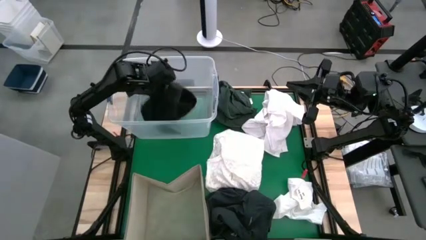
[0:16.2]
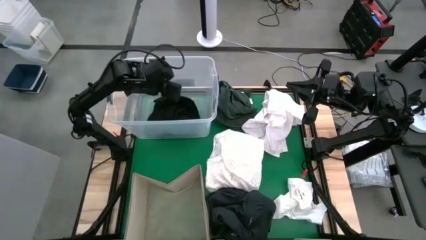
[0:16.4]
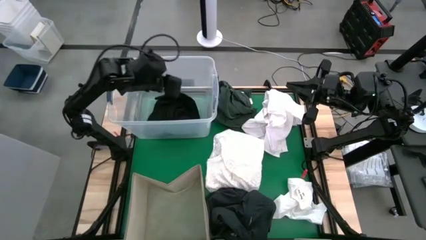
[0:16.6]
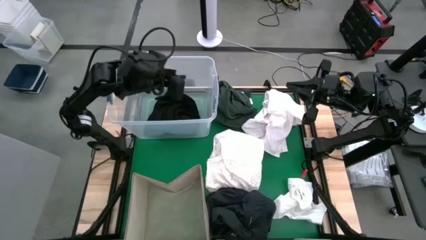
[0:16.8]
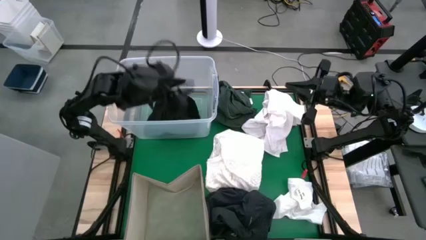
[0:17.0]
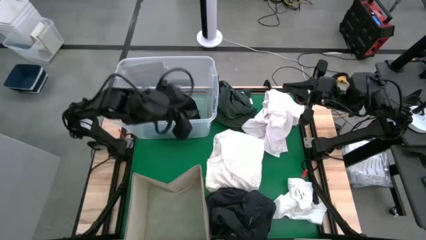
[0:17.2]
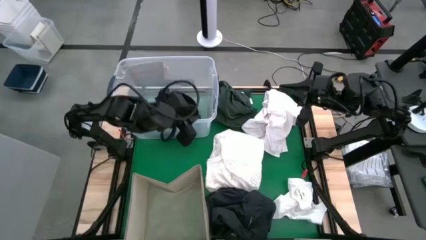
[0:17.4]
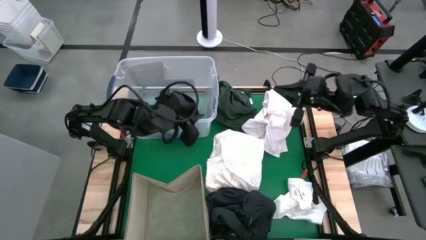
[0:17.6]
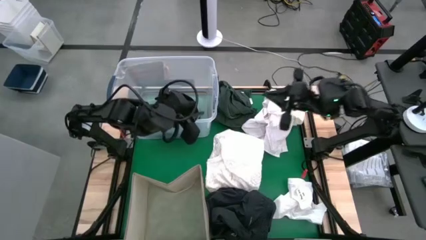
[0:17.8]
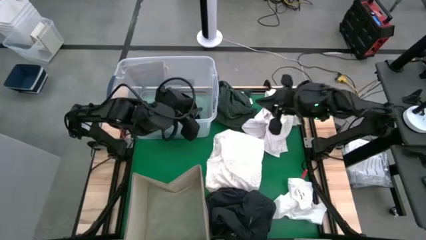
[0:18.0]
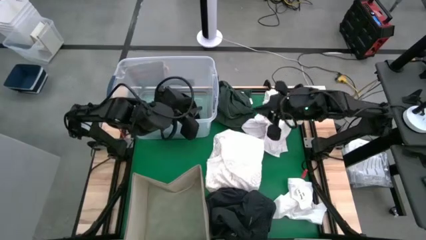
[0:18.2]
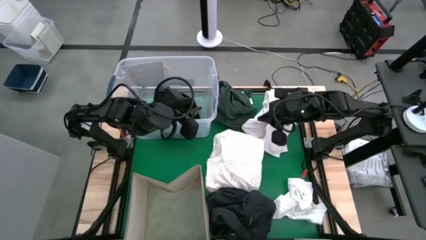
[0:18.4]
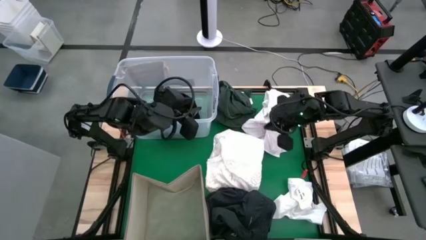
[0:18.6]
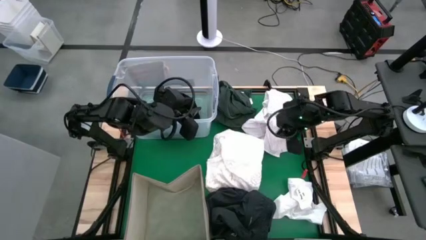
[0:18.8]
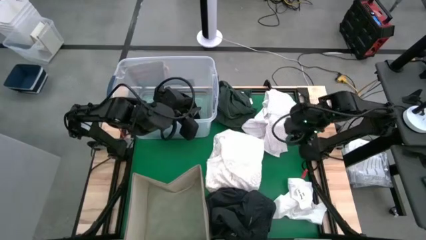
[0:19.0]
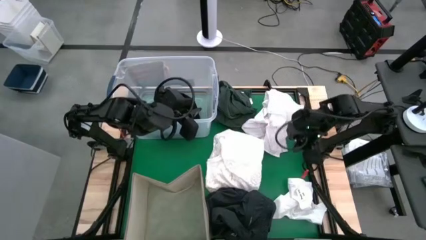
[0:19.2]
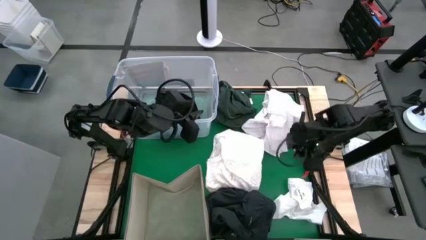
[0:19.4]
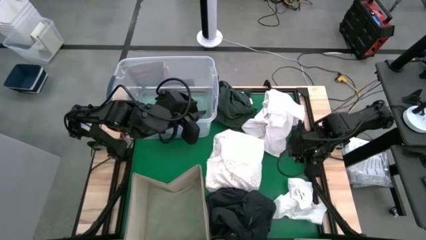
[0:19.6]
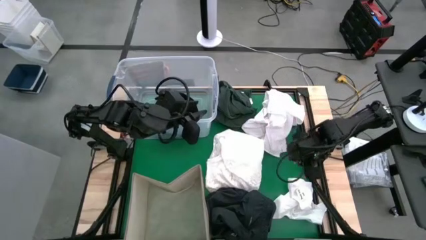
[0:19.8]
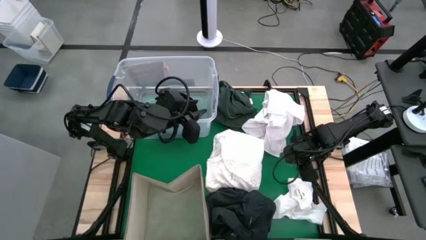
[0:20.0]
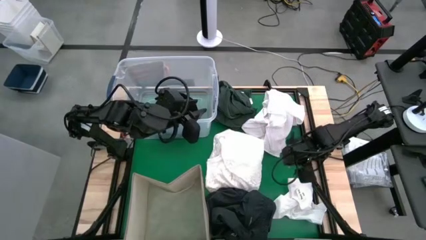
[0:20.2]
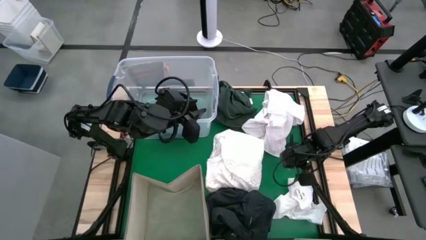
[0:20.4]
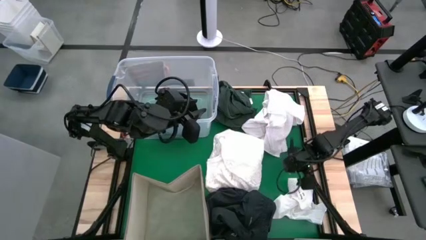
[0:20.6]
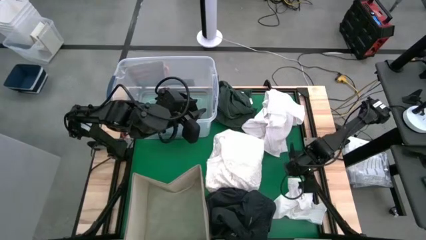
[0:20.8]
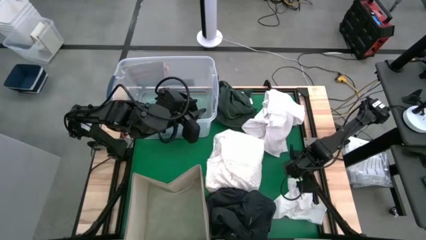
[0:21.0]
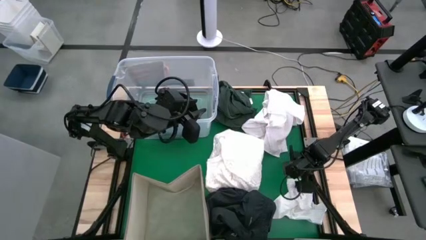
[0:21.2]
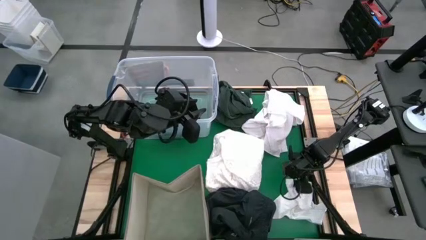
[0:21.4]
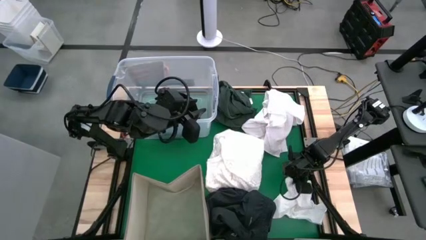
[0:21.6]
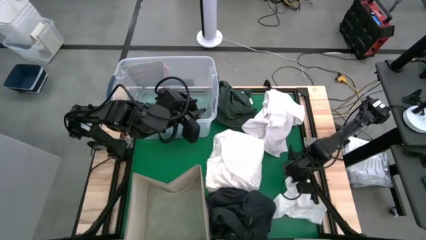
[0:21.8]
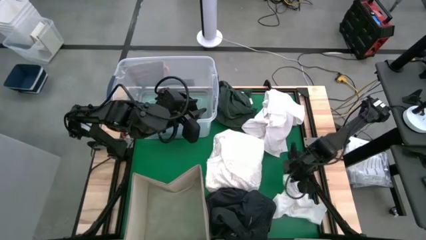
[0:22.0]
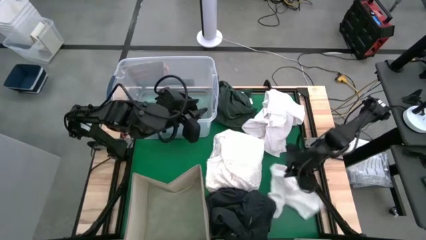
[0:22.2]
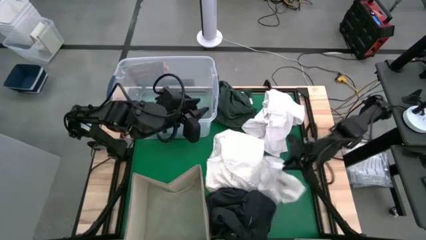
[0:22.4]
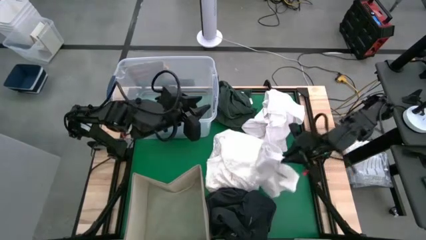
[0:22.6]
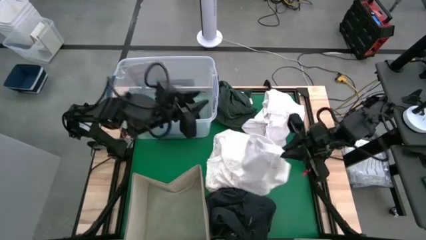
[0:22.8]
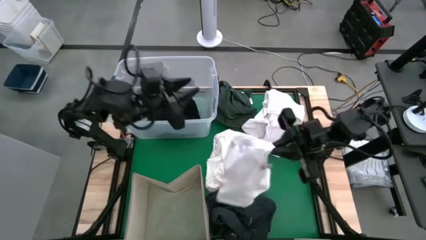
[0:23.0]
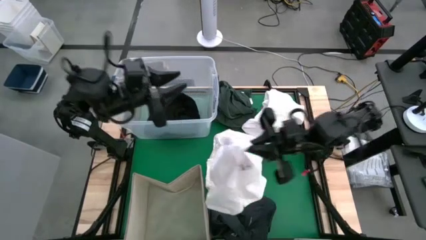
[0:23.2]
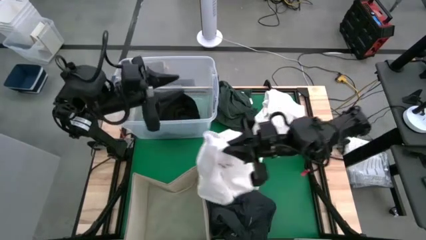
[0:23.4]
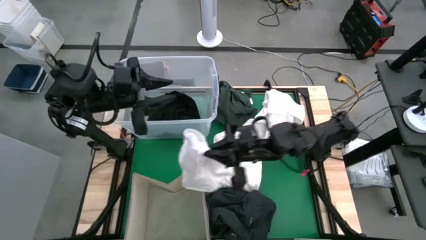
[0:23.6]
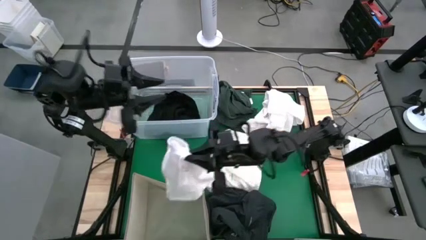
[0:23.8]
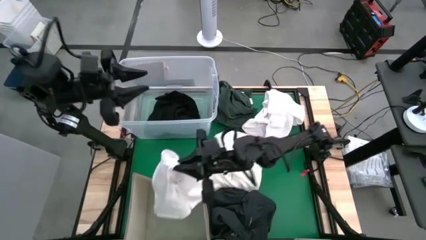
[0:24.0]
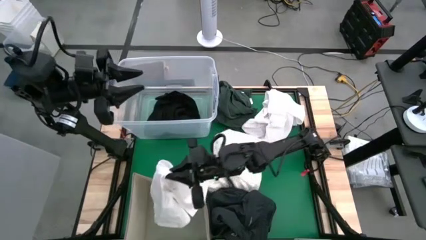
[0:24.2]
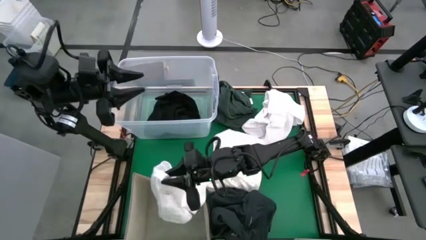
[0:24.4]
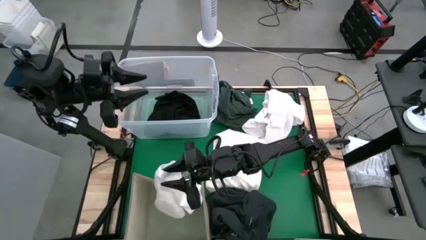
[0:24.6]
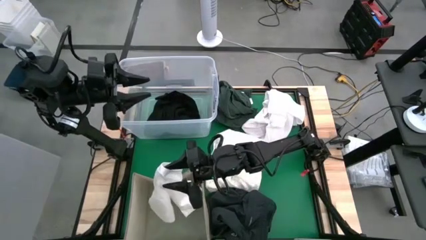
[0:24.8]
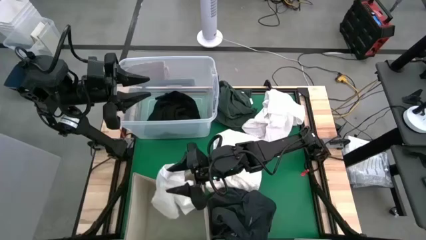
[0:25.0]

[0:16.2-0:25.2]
Task: Sort clothes
Put the bottom white shirt into the brown bin

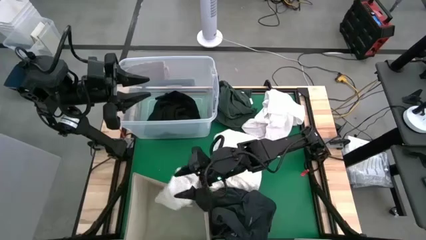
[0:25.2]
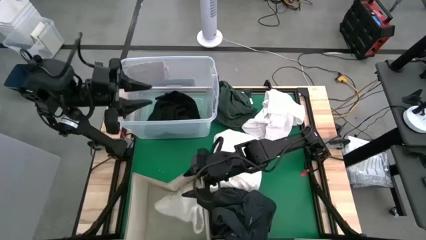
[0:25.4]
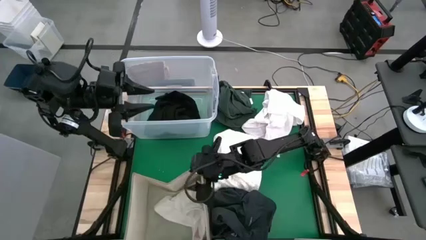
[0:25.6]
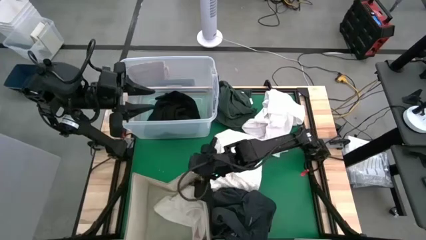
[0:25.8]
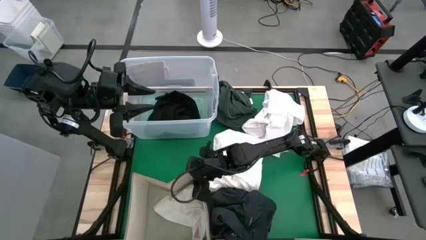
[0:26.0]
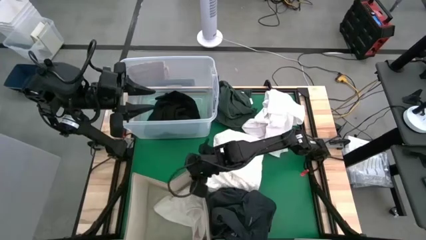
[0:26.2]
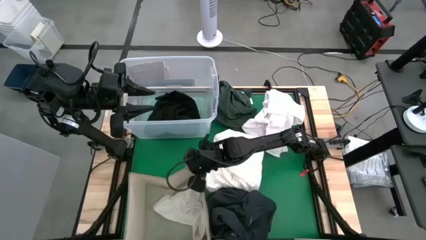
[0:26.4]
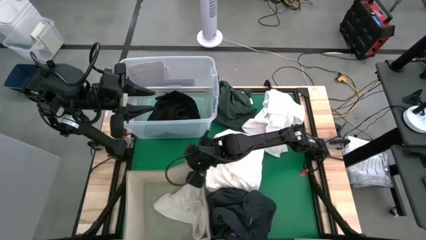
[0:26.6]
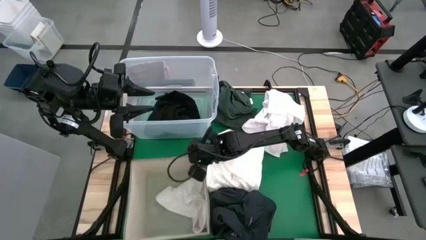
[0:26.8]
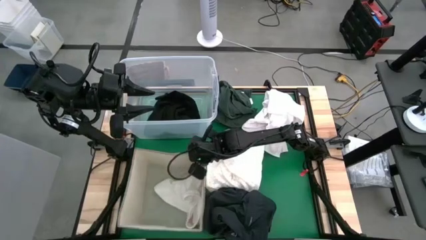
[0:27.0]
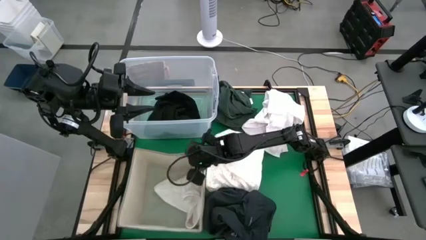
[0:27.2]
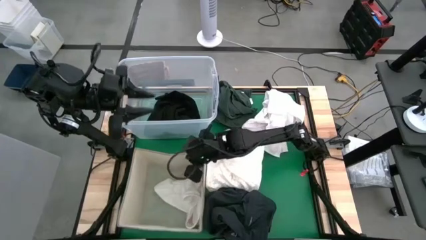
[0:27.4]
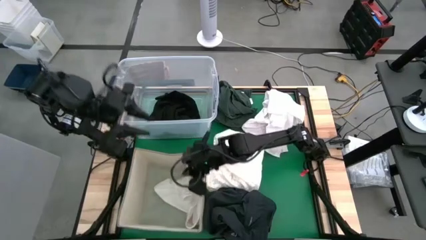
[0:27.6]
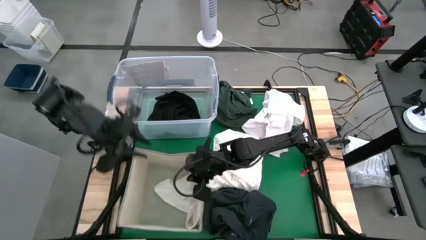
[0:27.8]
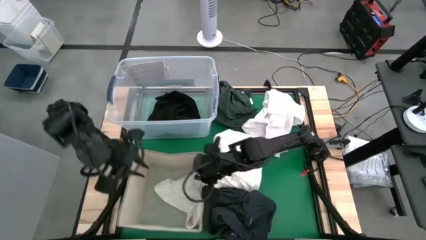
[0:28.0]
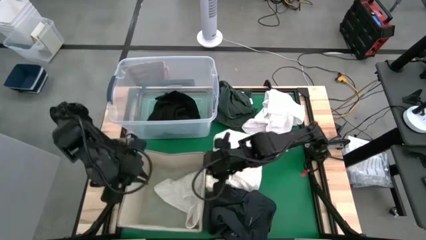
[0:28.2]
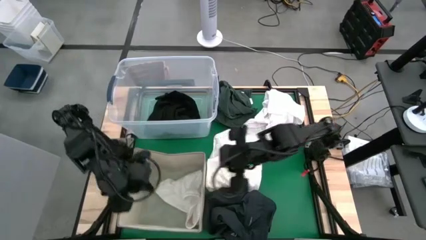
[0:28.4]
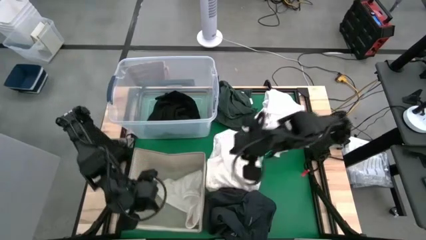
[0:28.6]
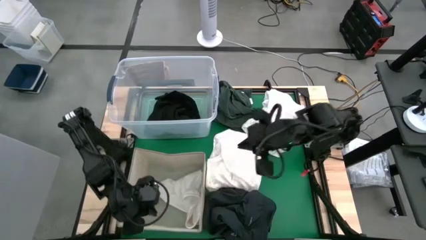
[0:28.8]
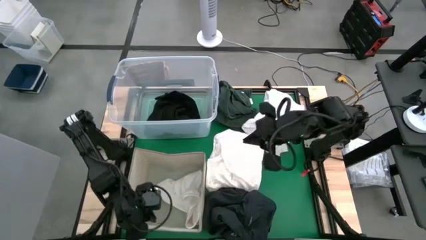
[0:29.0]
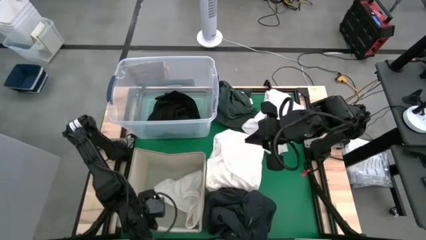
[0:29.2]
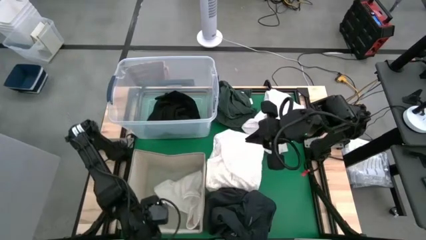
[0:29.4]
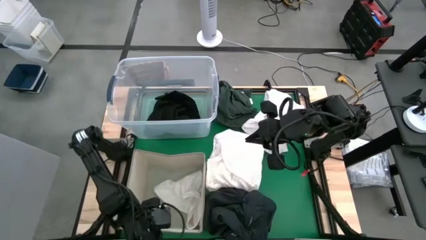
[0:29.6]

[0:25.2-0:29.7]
Adjust the brown bin

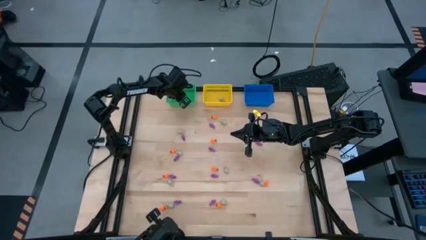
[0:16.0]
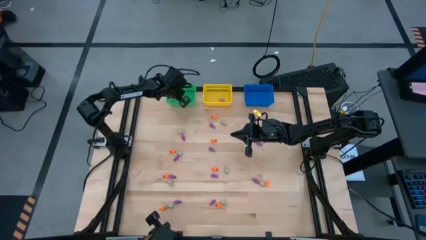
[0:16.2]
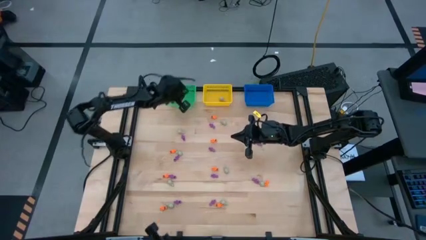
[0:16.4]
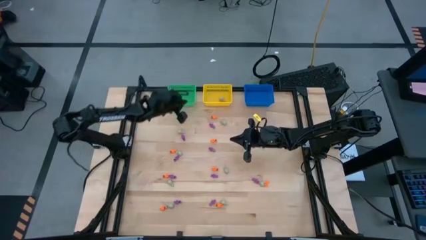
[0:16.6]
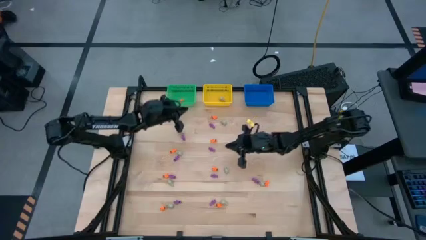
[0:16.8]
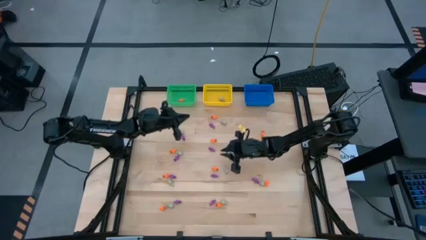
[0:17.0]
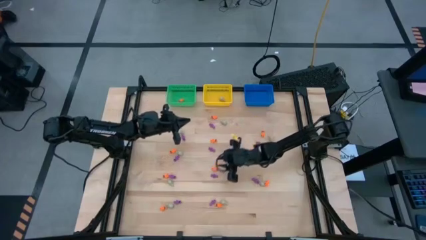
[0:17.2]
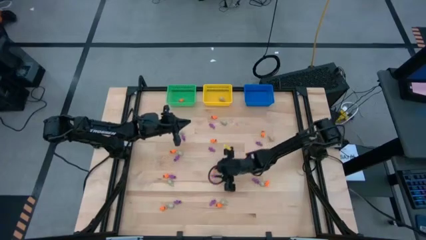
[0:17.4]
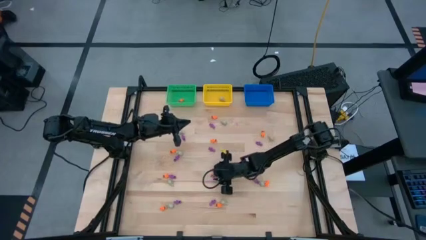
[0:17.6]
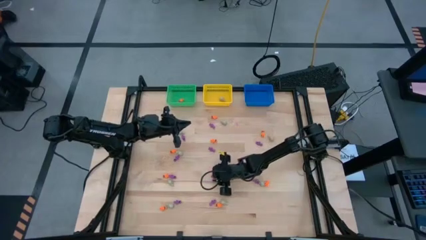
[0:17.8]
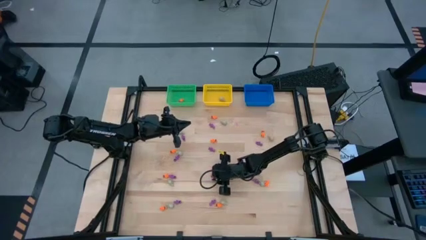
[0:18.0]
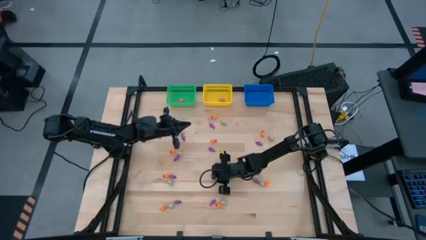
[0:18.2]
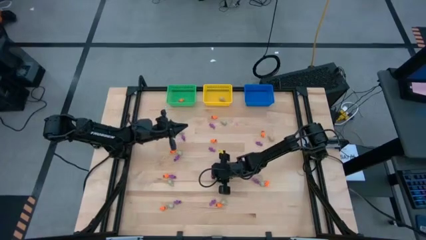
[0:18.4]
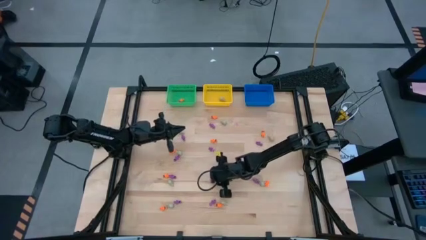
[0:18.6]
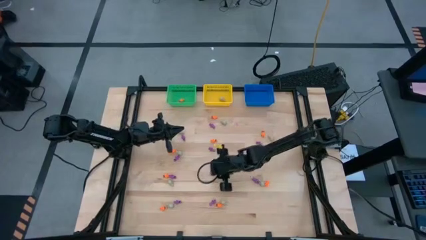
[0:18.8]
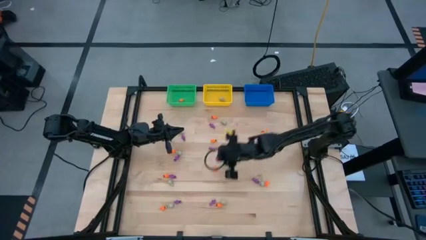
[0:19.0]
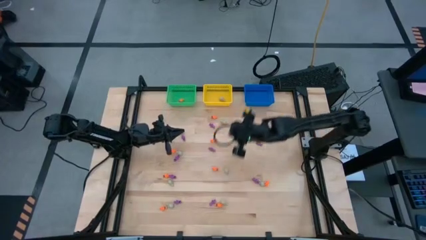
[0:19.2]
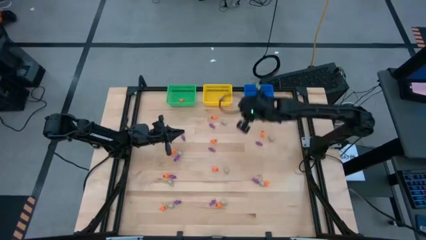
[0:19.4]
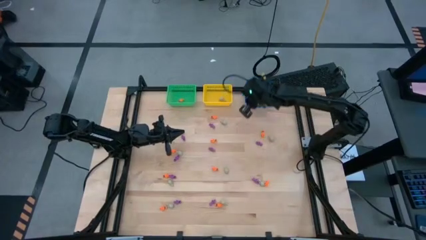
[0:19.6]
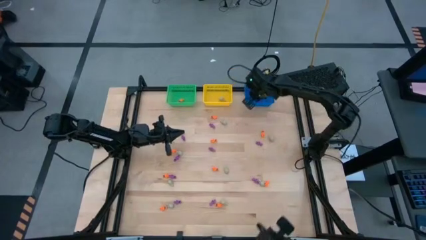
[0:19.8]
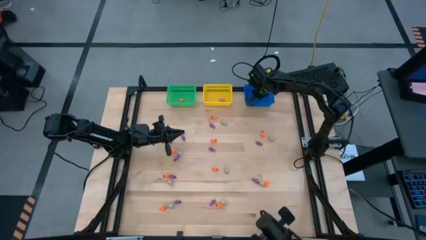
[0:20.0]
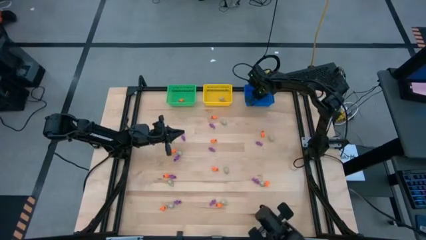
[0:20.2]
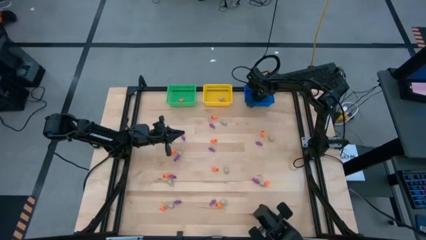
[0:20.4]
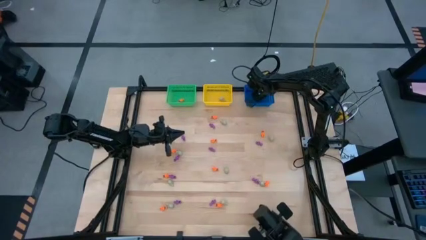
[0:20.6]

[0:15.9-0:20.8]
Task: Sort Halloween decoration
Put the violet skeleton toy into the blue bin
